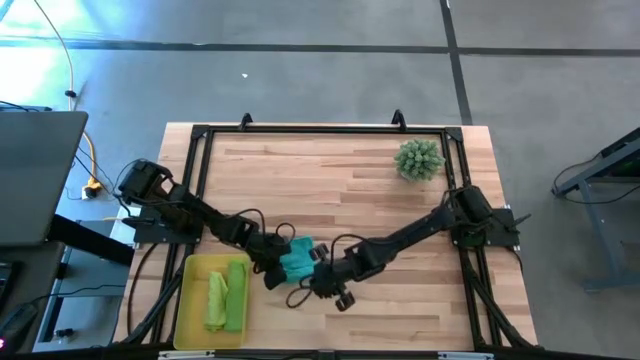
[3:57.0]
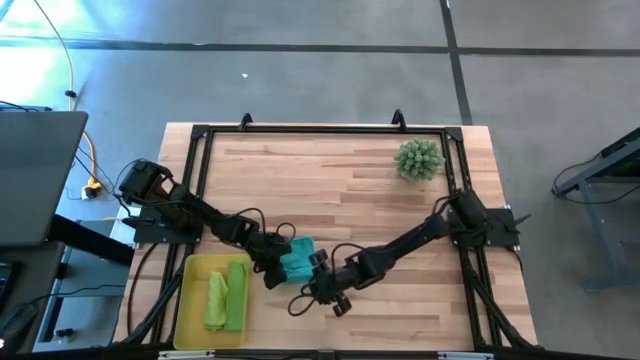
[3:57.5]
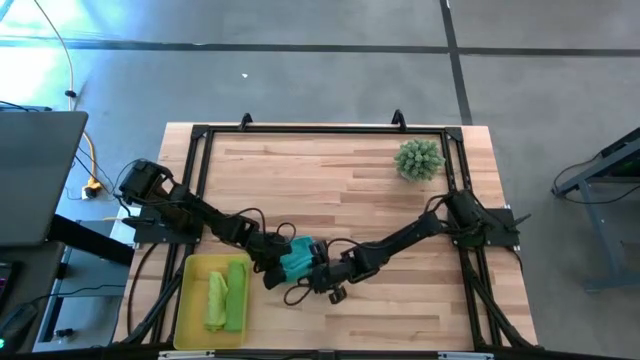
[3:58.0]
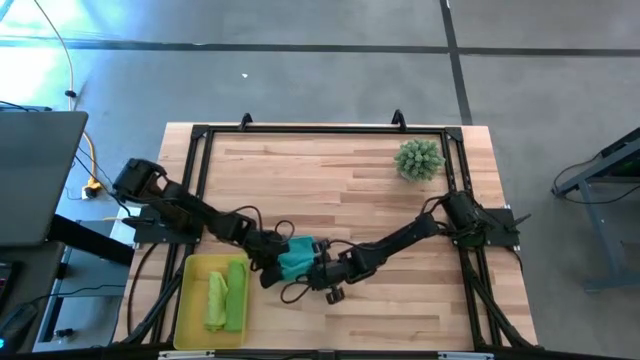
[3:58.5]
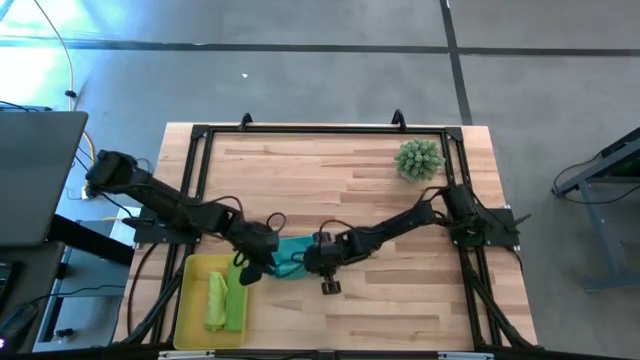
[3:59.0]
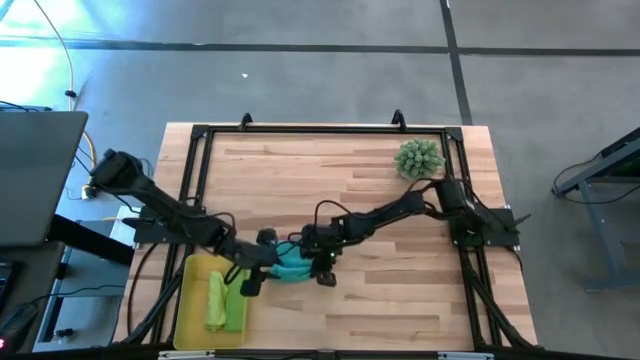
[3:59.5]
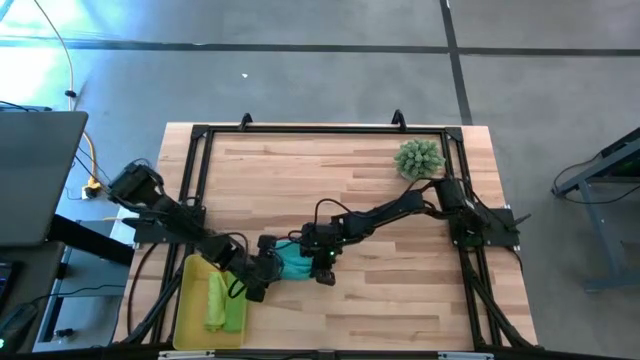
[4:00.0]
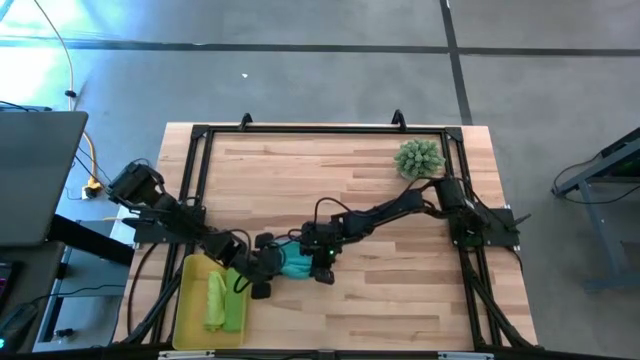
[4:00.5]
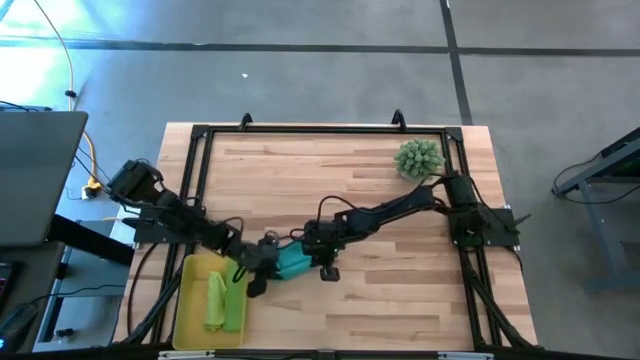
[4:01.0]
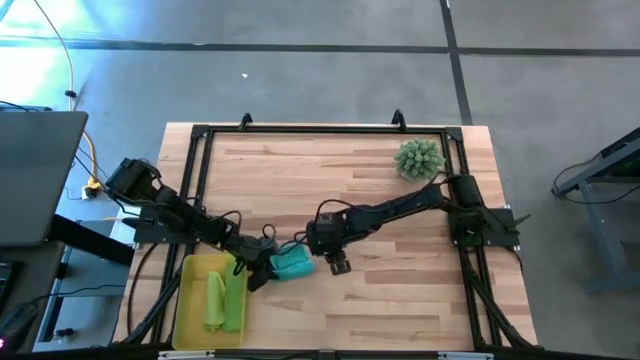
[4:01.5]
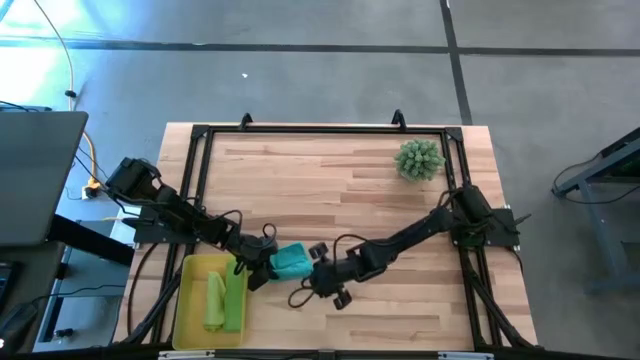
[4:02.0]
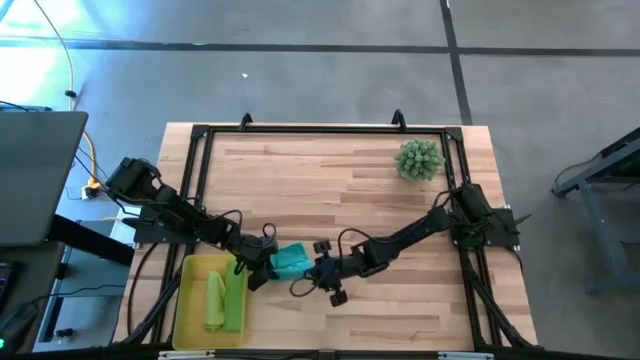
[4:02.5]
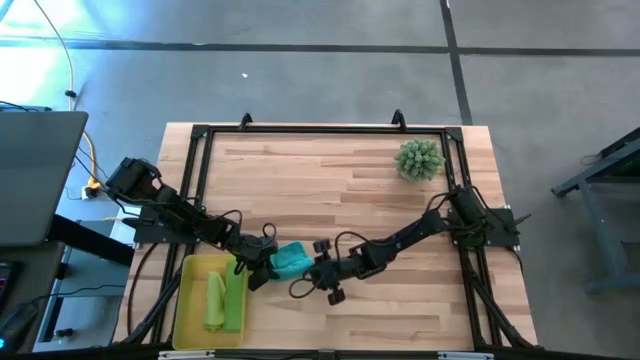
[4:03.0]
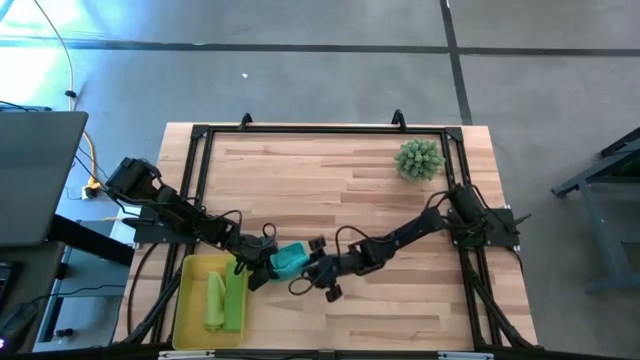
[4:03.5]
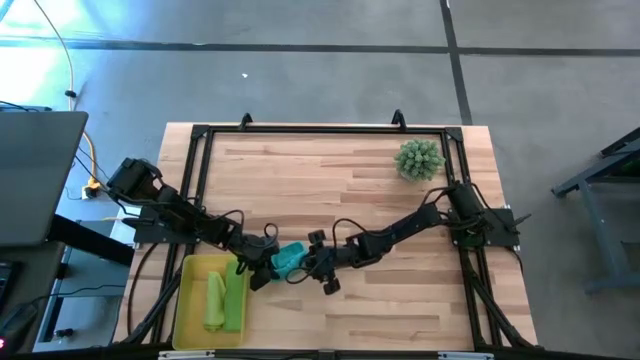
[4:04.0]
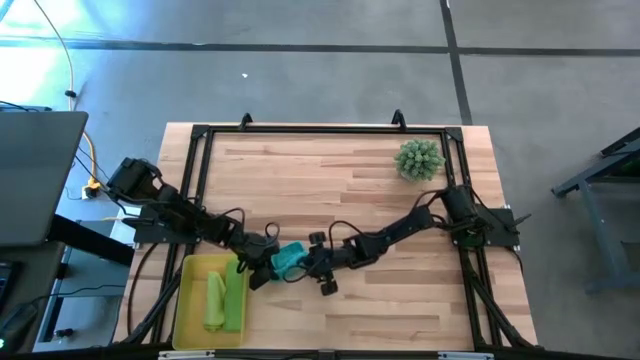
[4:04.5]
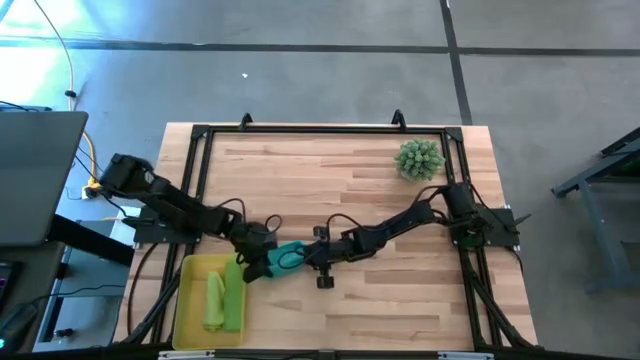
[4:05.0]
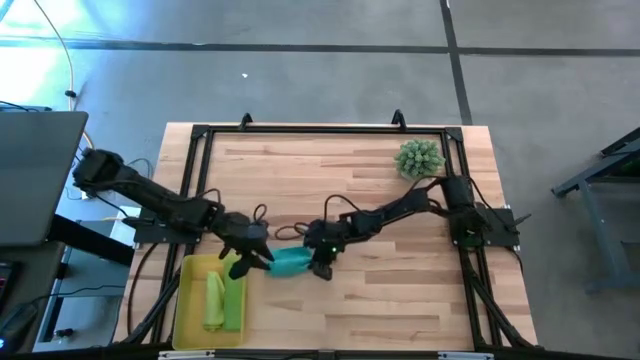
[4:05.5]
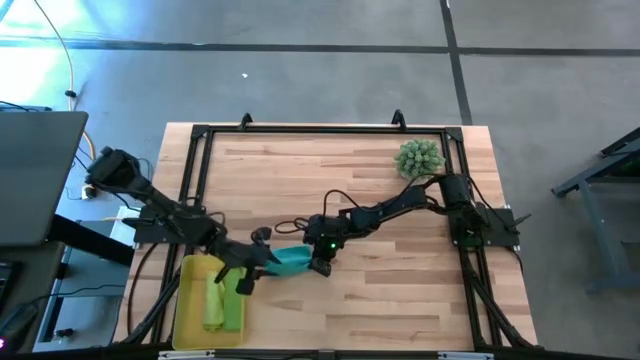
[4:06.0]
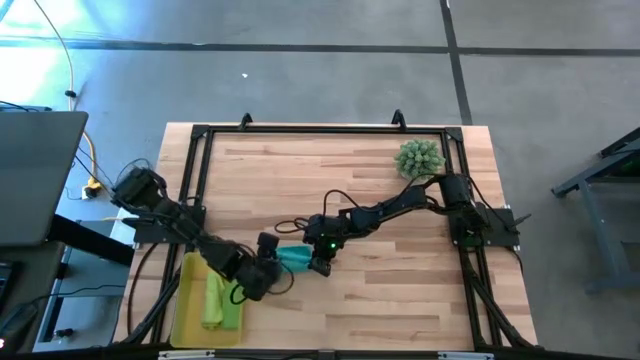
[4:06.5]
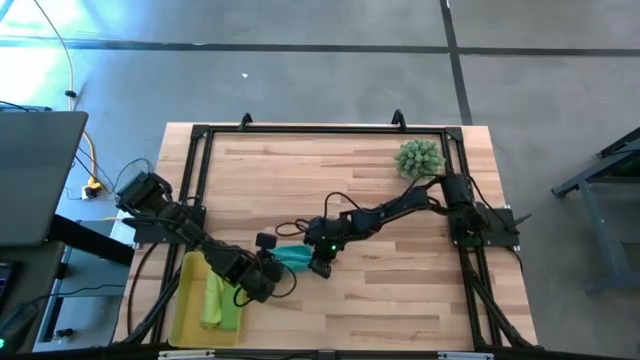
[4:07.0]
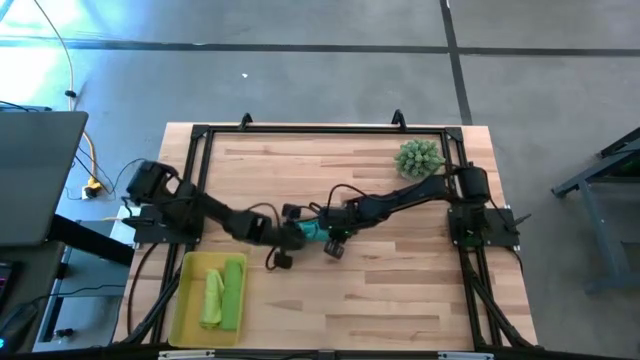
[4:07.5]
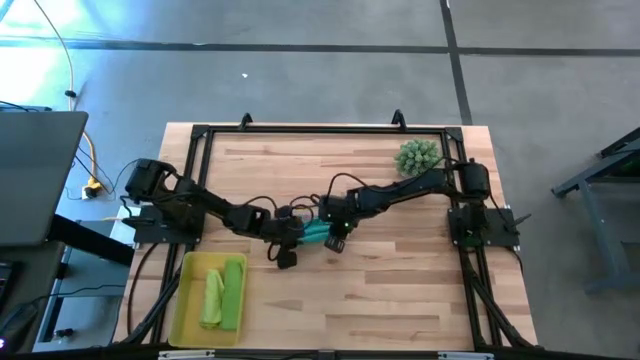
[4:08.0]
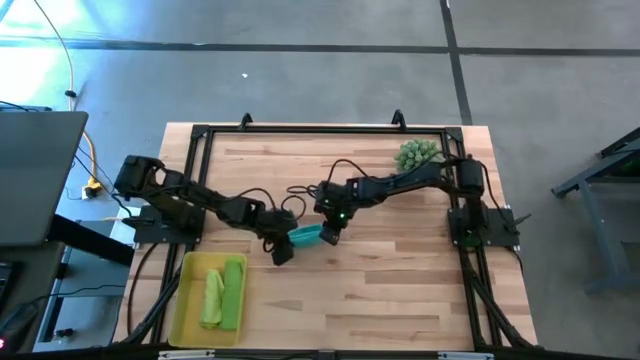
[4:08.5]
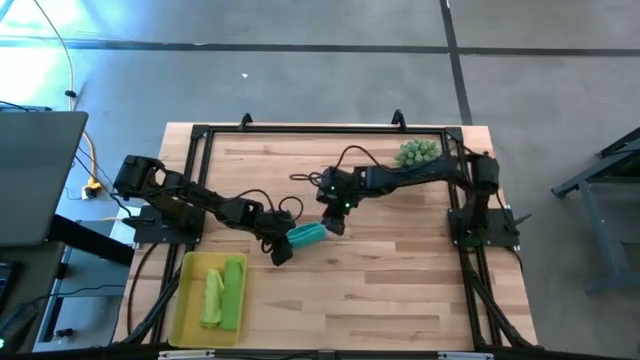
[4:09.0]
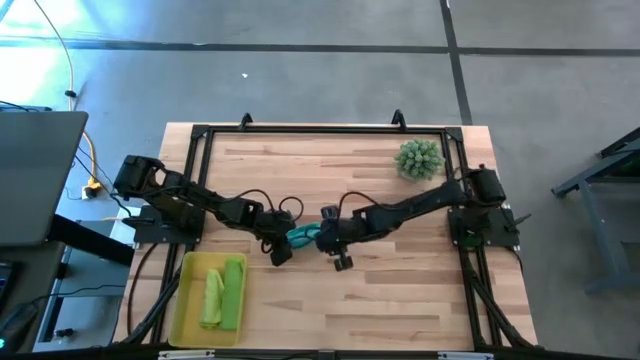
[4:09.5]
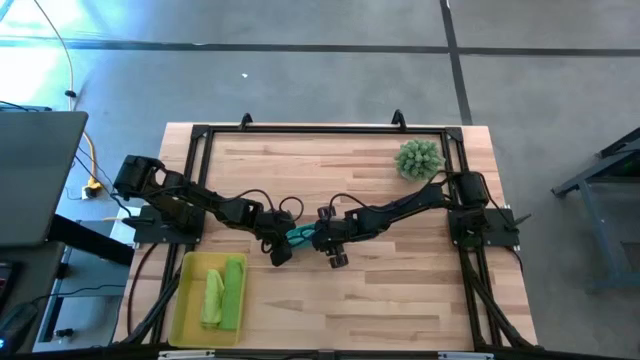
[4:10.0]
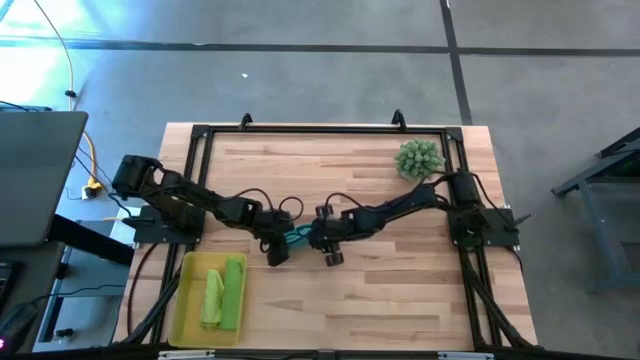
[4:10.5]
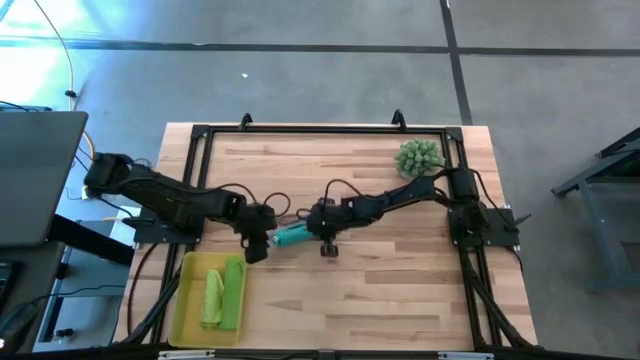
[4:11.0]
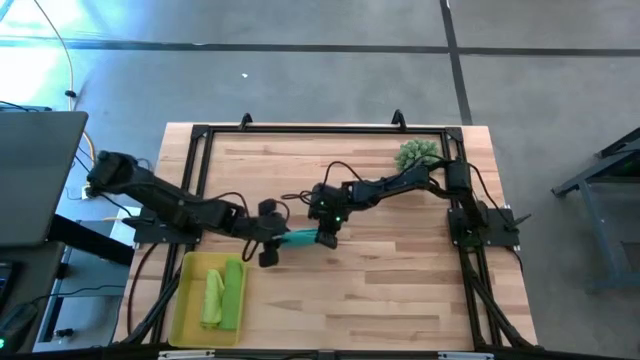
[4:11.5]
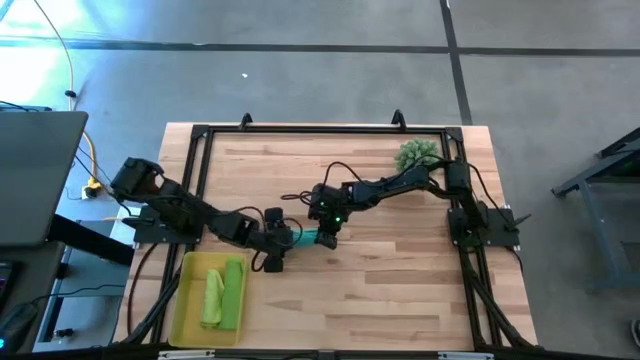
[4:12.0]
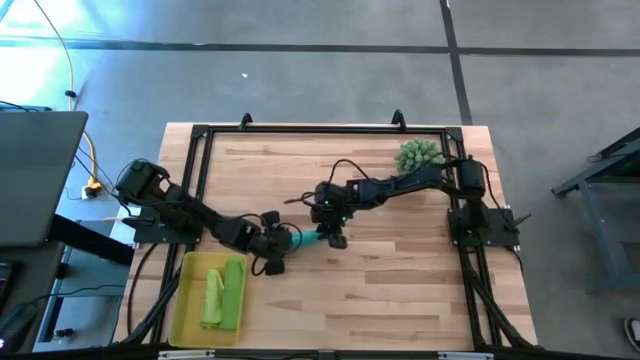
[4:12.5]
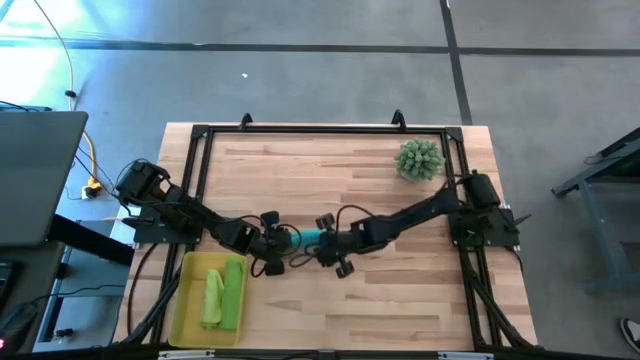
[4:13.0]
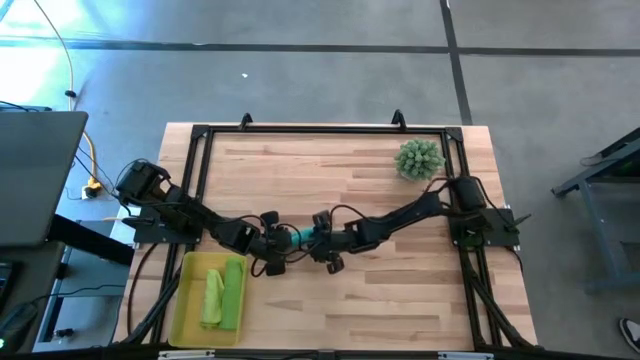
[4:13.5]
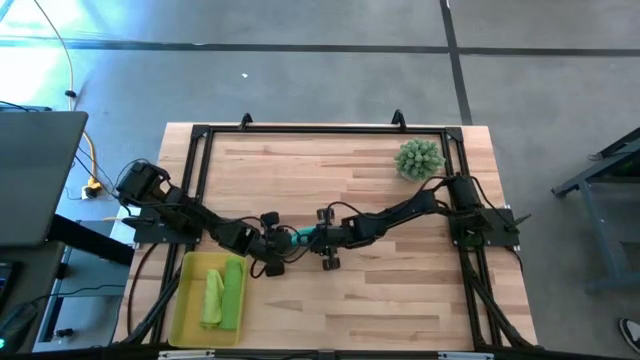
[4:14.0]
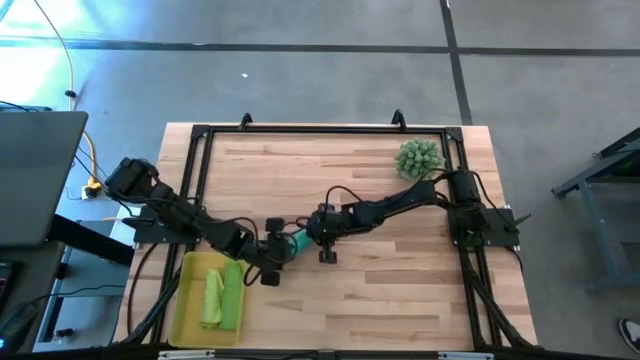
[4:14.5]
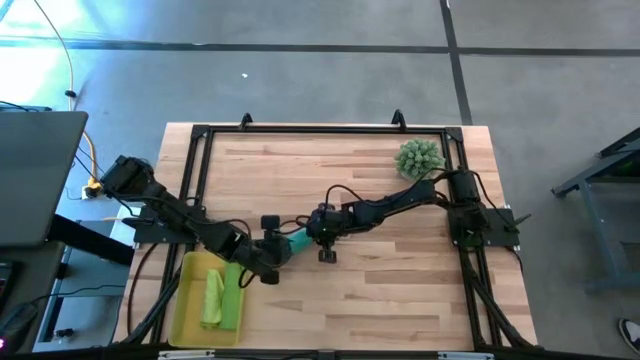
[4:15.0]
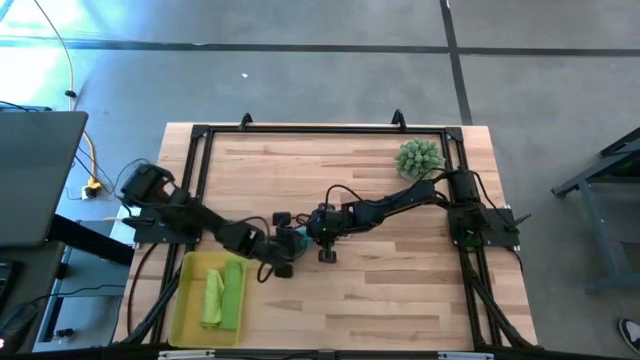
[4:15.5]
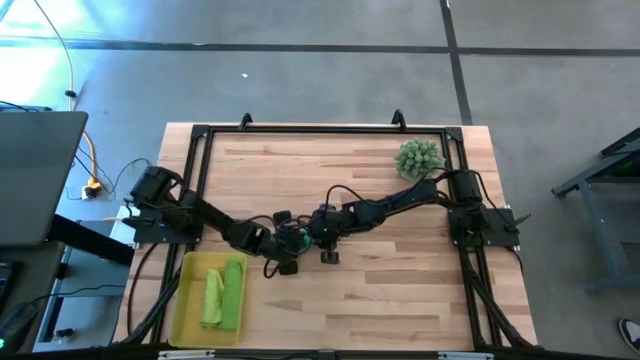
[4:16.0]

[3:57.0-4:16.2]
Task: Roll microfiber towels into tight, uniform cylinder then place into a basket
Roll the blue microfiber towel

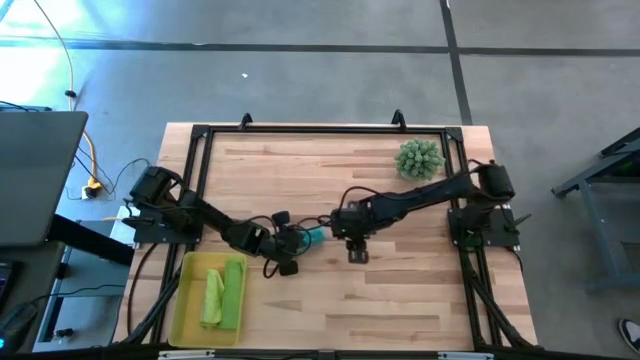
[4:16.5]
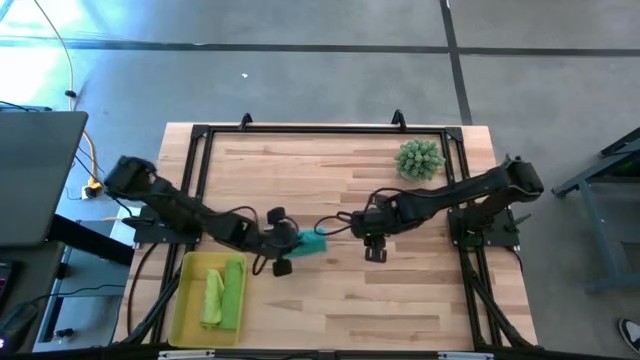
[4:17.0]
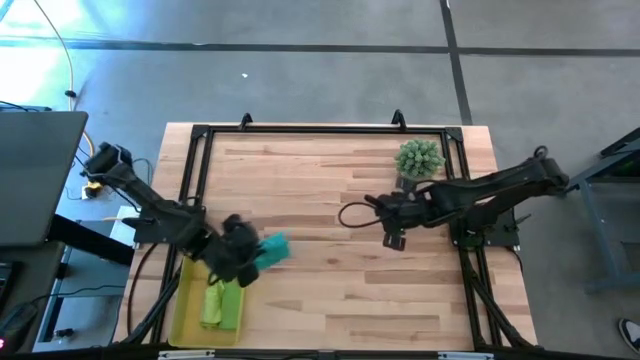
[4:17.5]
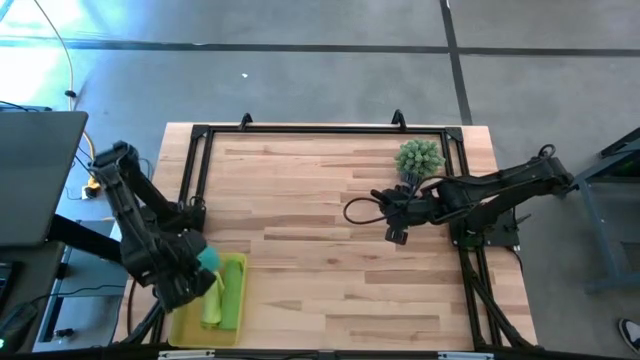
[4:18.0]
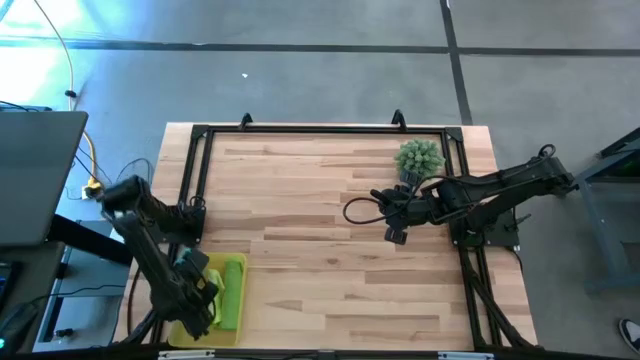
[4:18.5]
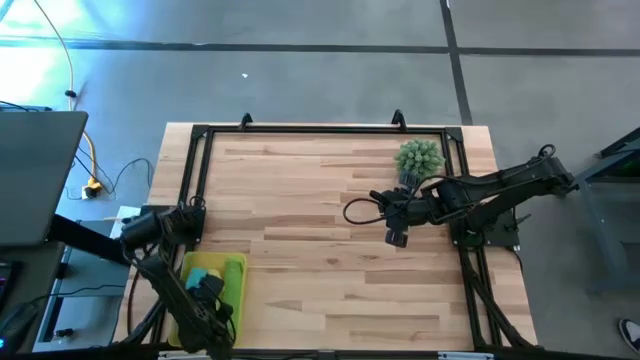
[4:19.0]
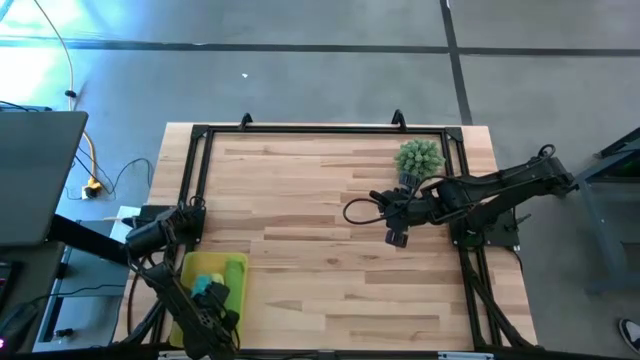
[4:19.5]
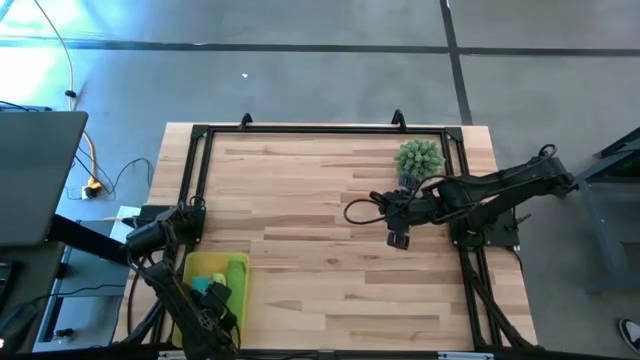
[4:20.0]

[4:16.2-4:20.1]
Put the blue microfiber towel into the yellow bin
